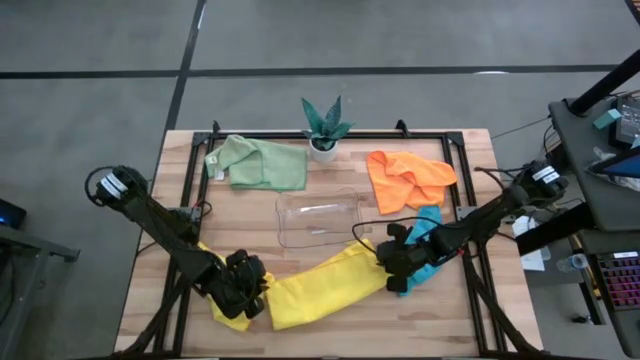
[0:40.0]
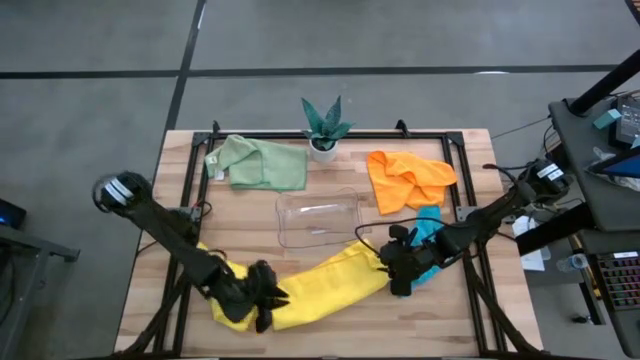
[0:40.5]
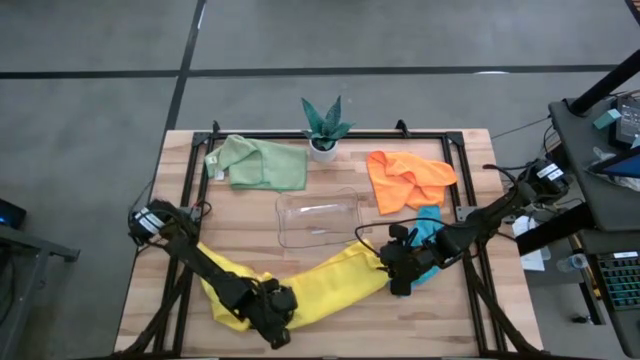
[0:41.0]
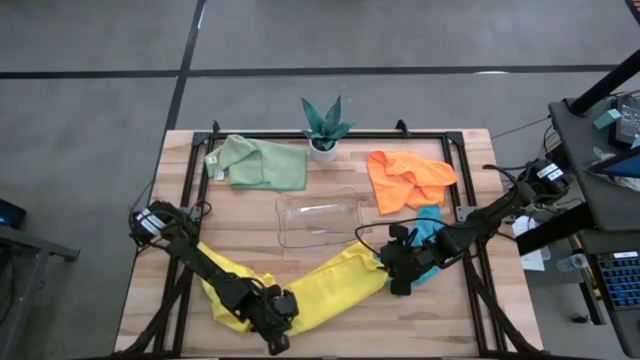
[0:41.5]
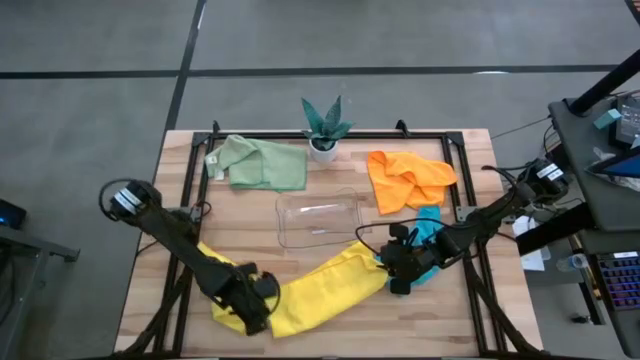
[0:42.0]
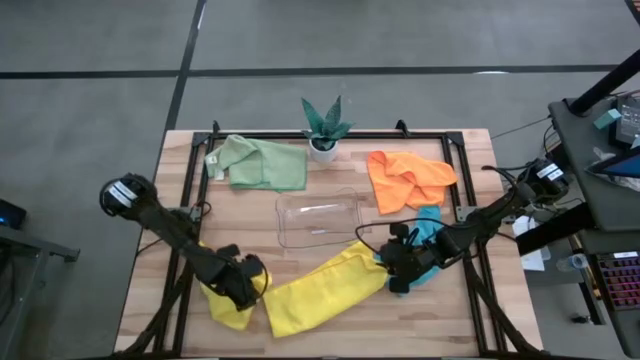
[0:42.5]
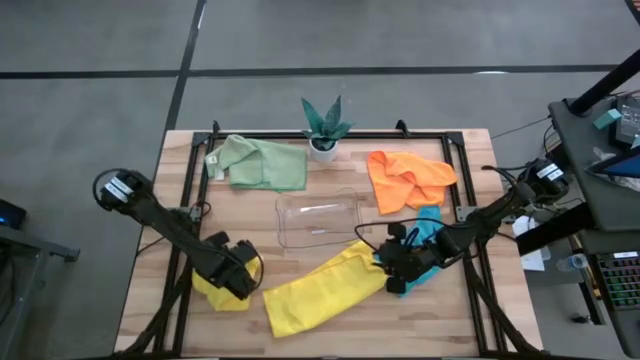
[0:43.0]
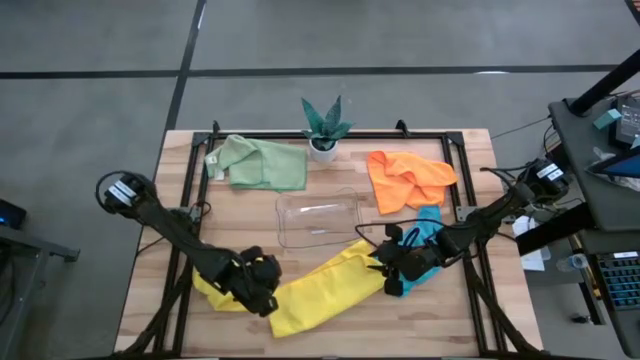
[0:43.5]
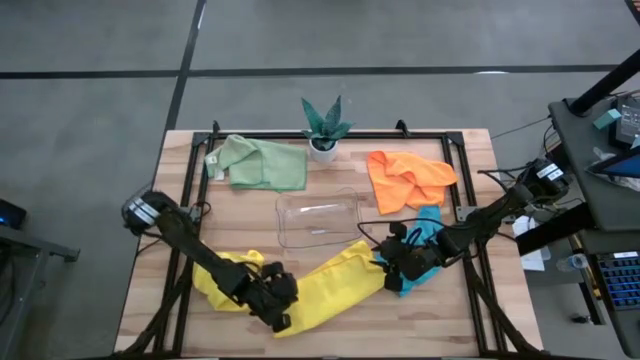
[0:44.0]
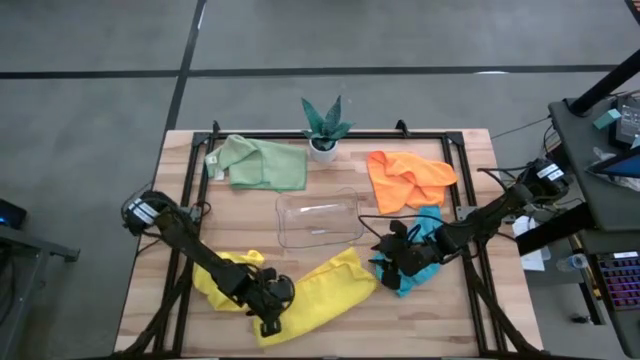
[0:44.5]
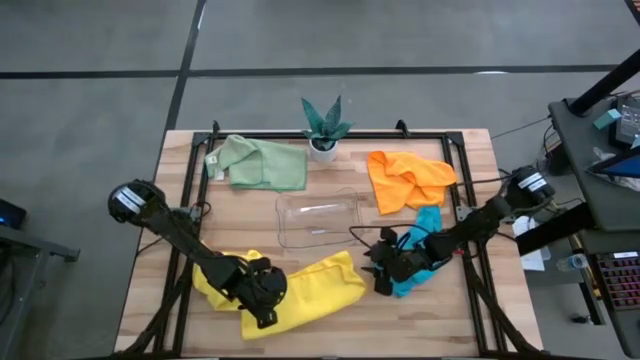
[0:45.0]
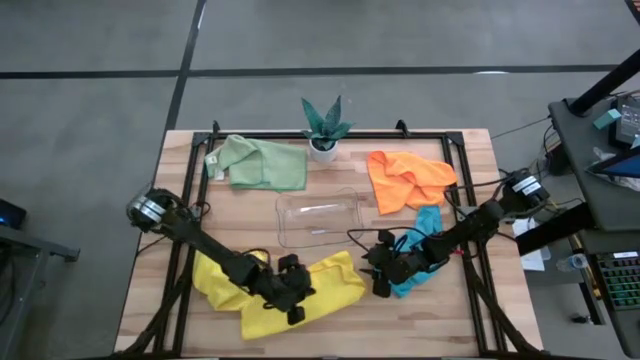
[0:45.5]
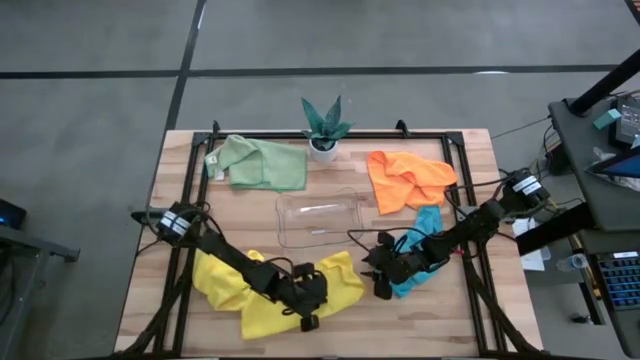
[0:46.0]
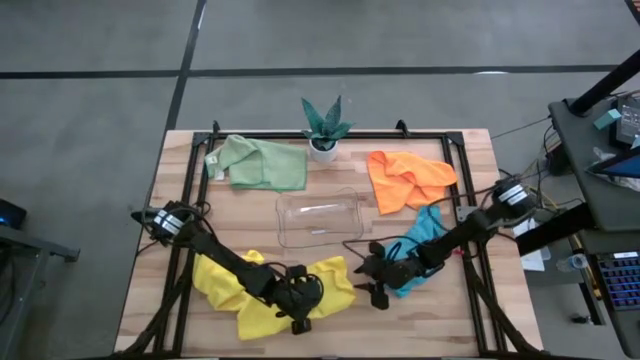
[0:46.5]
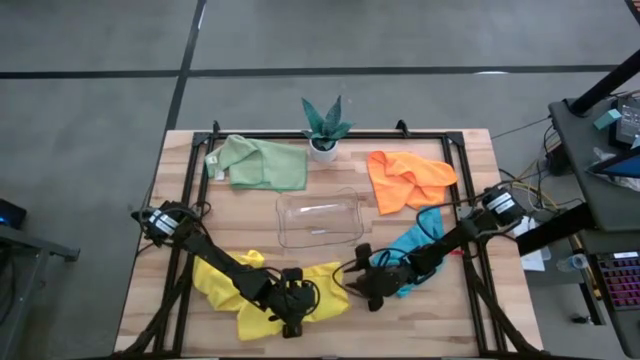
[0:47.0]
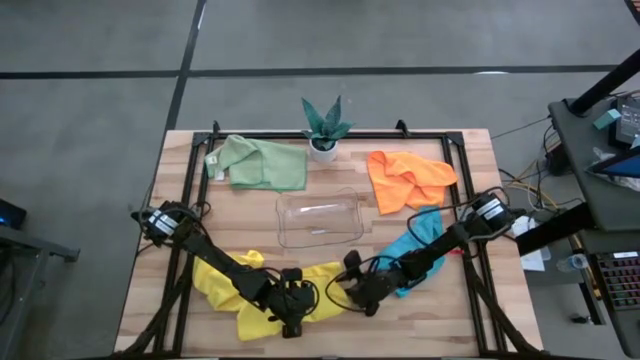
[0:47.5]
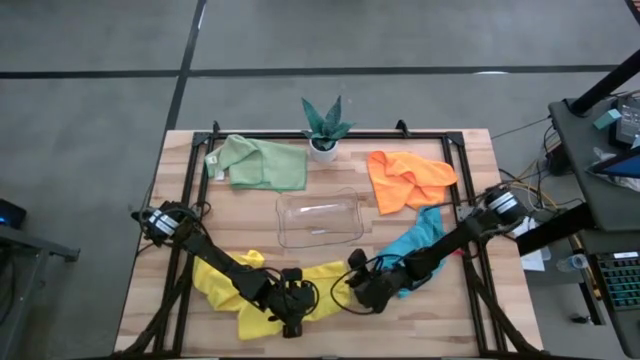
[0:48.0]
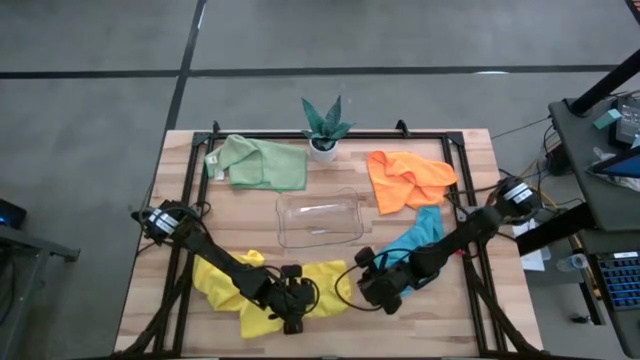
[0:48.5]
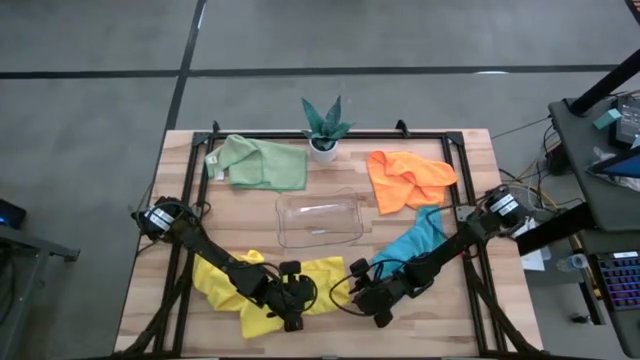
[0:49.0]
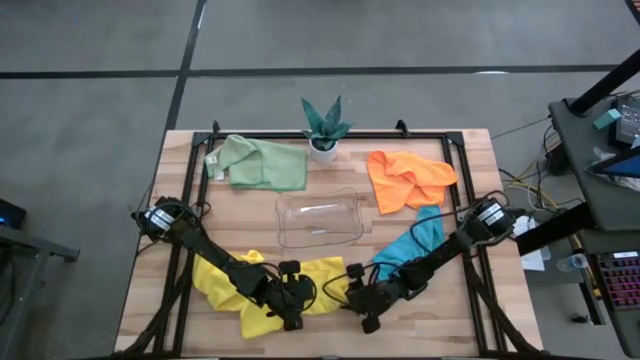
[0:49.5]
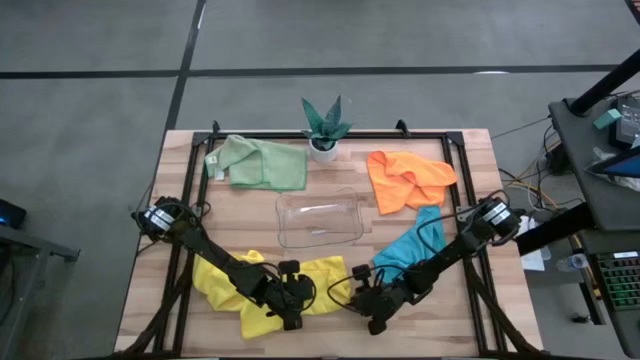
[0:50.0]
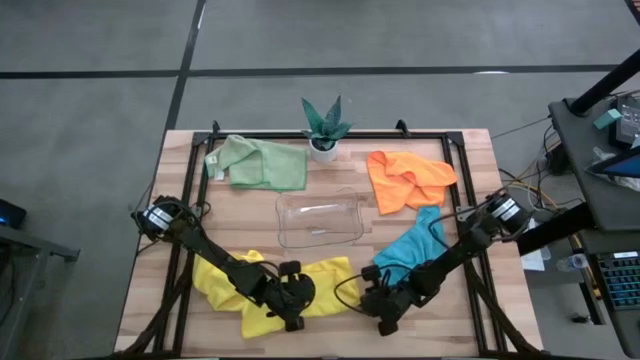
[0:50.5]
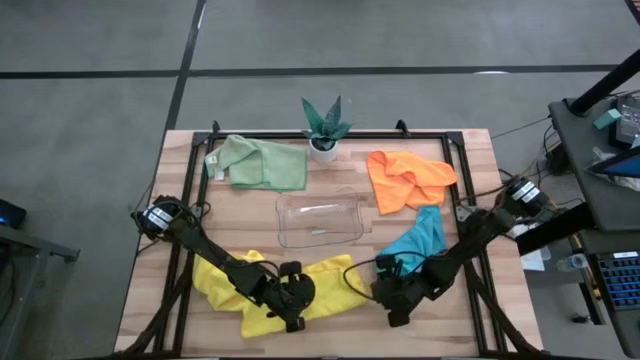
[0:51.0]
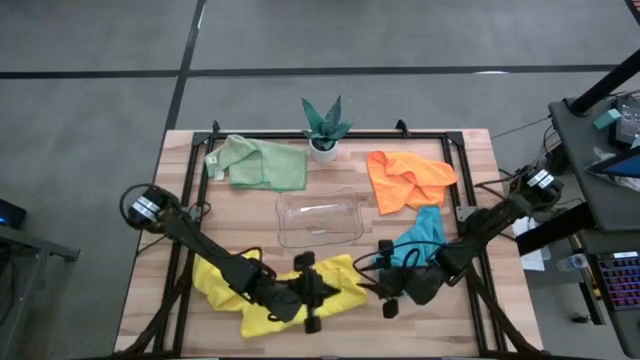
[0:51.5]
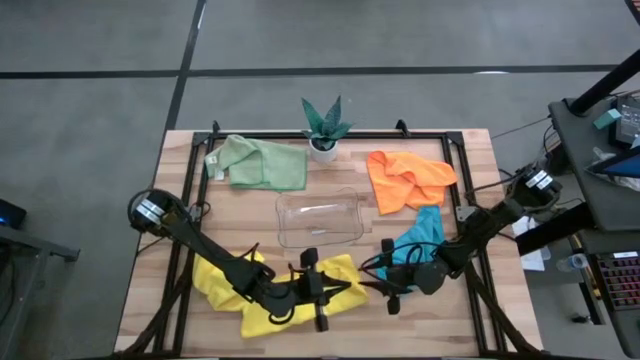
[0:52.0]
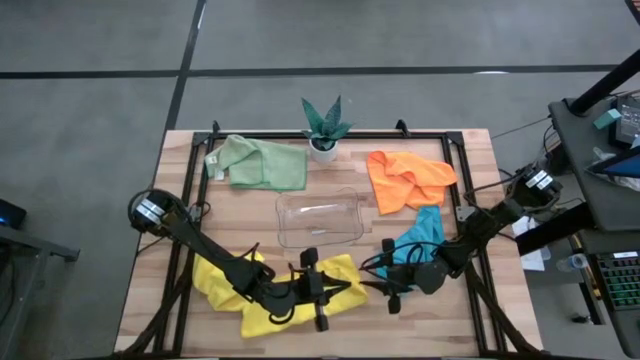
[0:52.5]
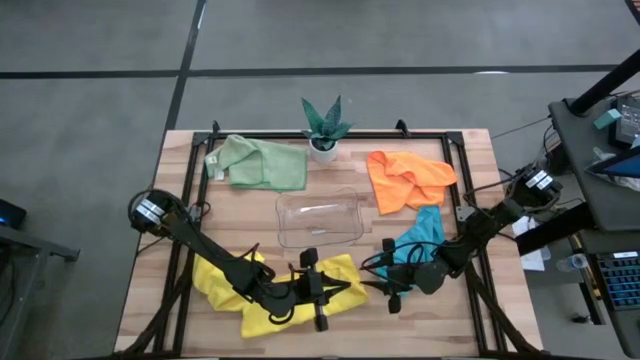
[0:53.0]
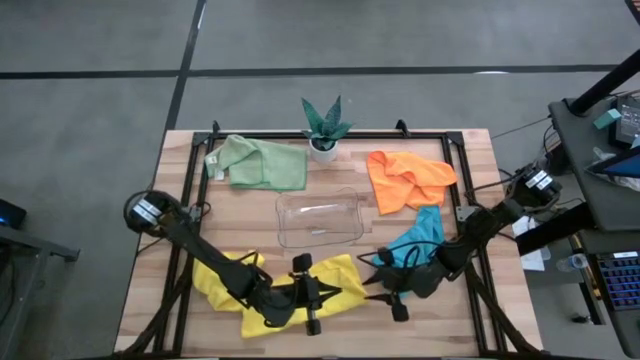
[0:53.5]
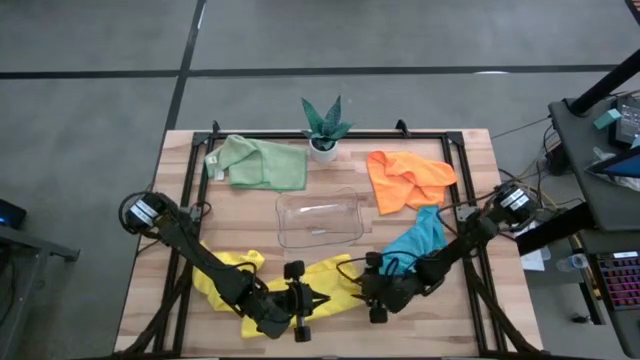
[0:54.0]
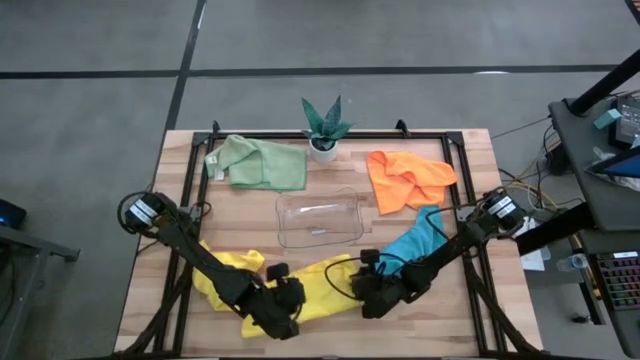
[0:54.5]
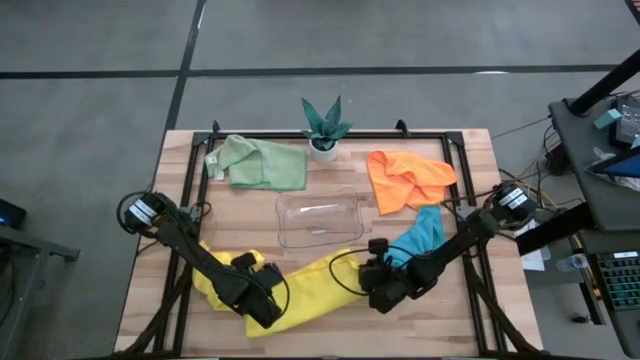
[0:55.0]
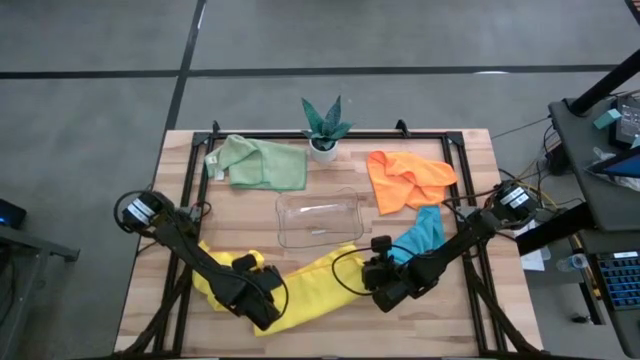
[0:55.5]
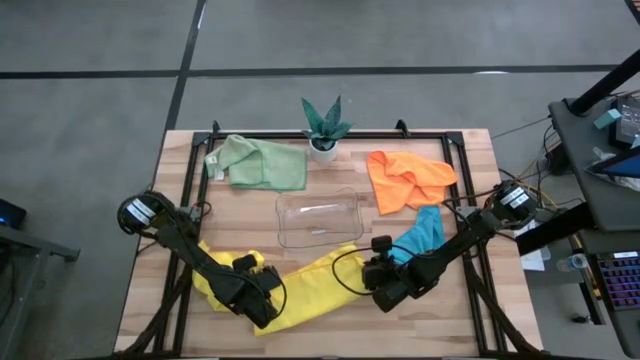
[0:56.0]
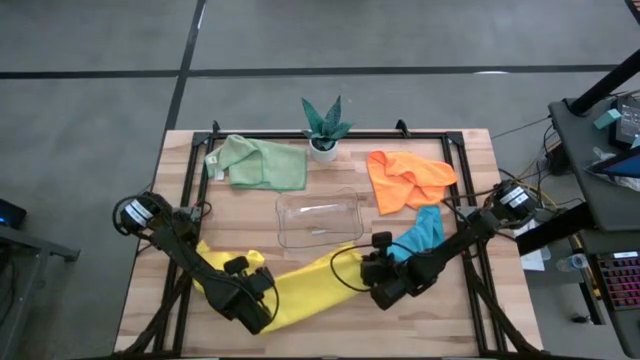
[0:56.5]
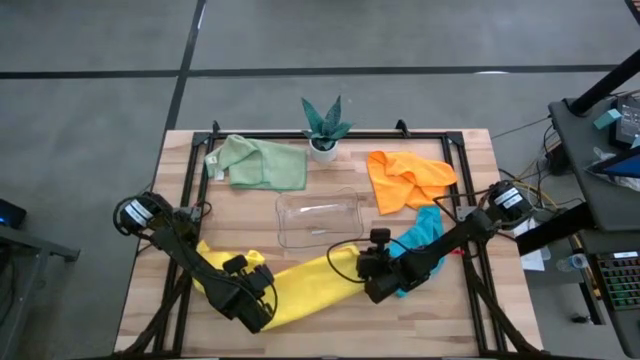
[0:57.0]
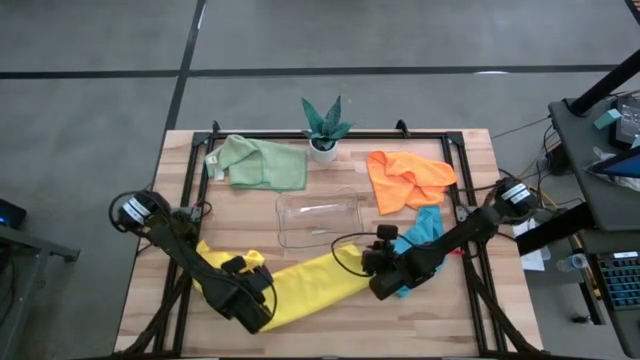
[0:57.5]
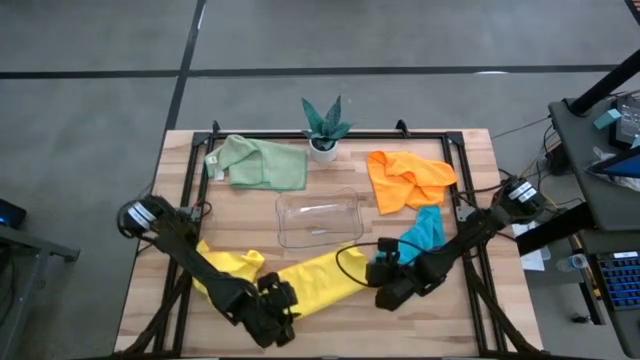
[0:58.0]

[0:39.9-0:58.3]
Task: Fold microfiber towels
Fold the right yellow microfiber towel
